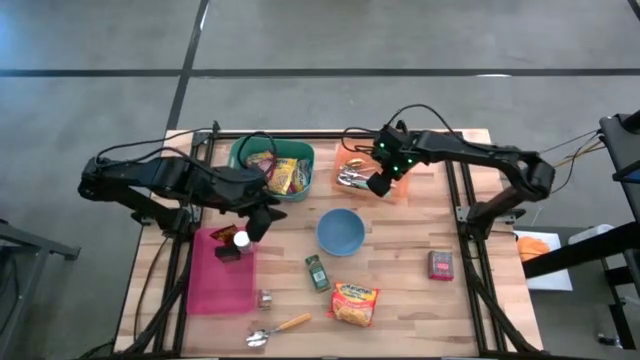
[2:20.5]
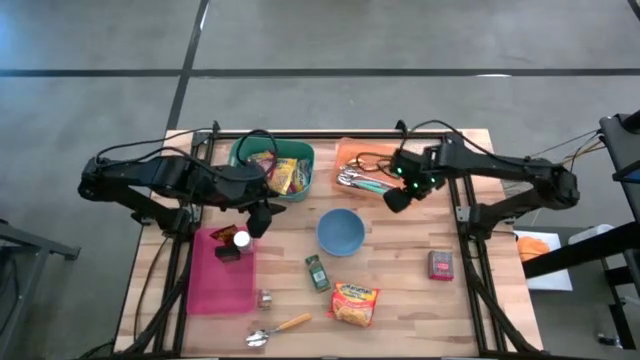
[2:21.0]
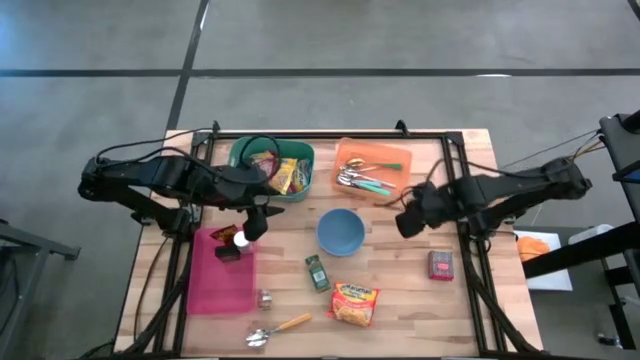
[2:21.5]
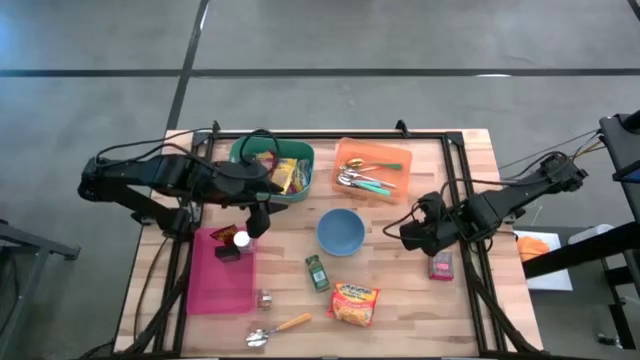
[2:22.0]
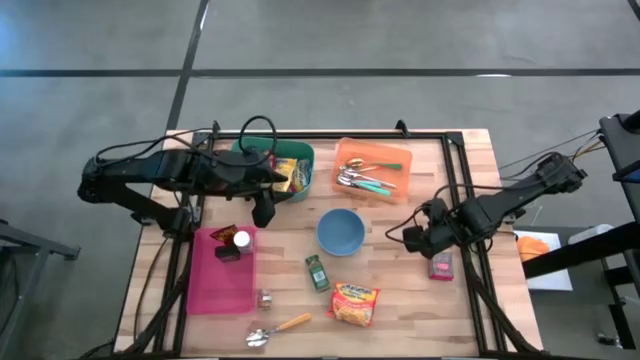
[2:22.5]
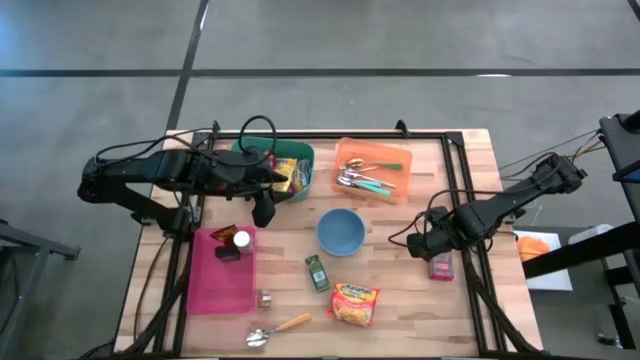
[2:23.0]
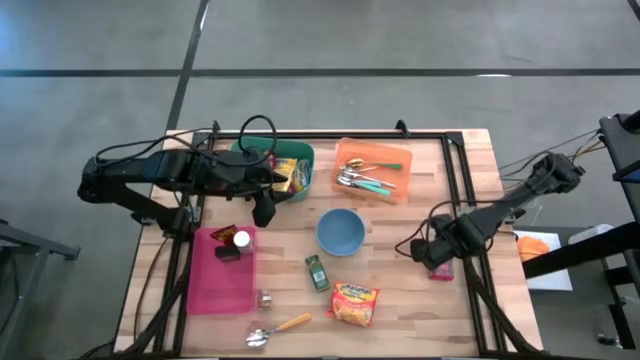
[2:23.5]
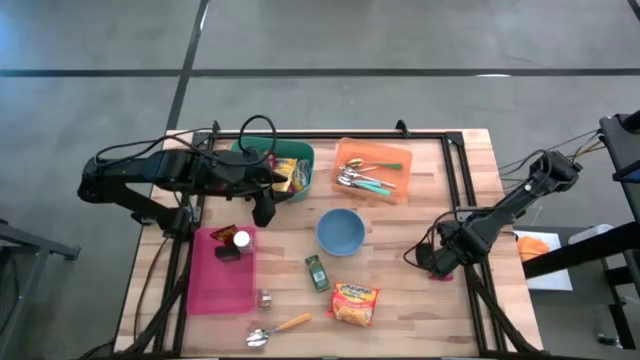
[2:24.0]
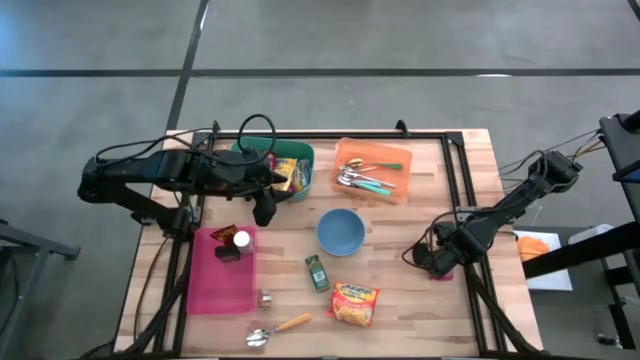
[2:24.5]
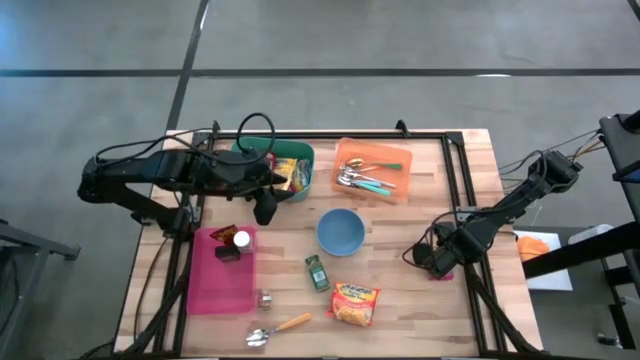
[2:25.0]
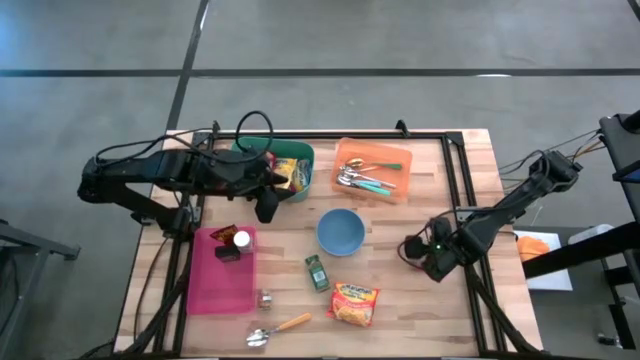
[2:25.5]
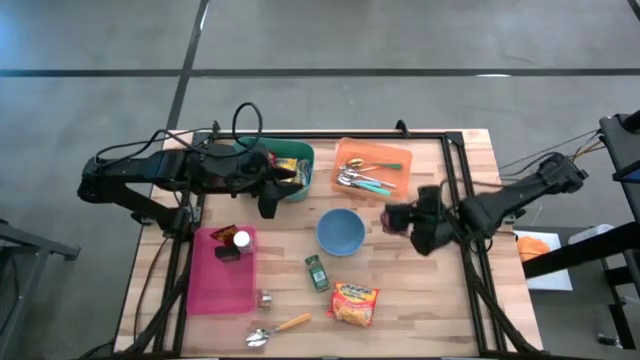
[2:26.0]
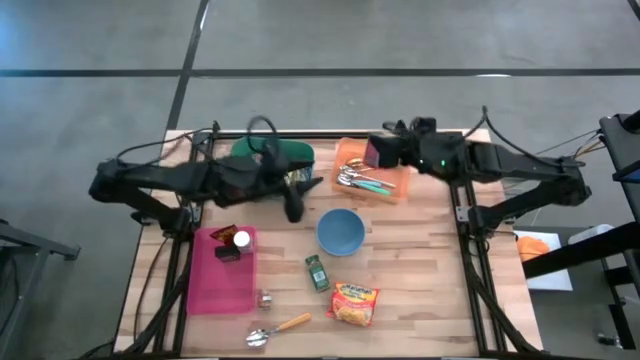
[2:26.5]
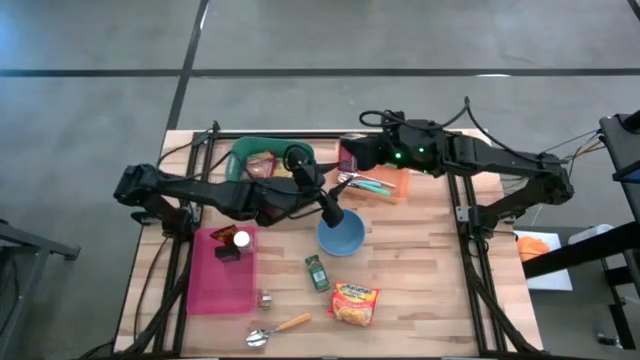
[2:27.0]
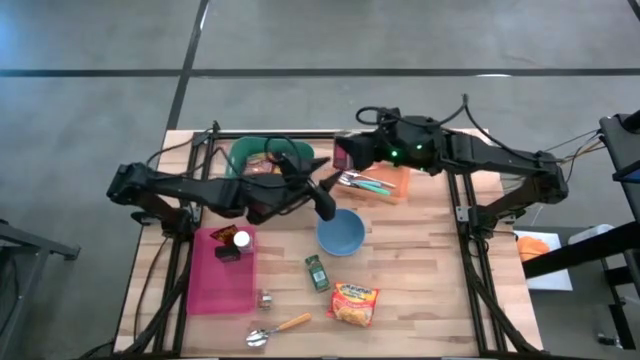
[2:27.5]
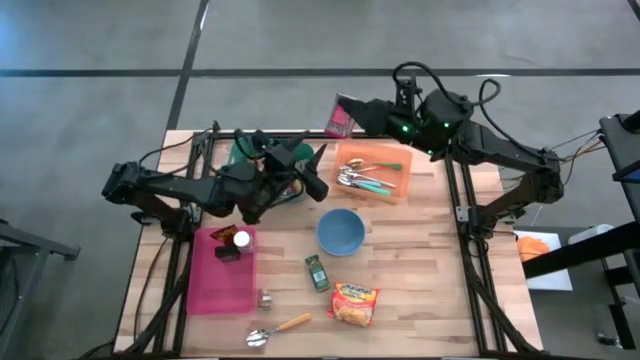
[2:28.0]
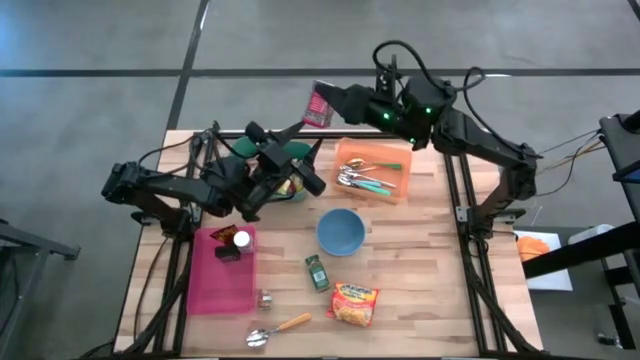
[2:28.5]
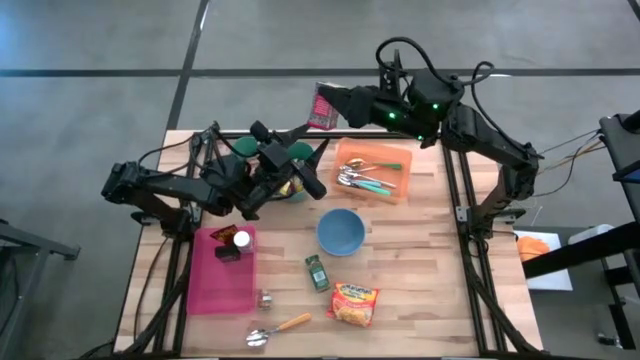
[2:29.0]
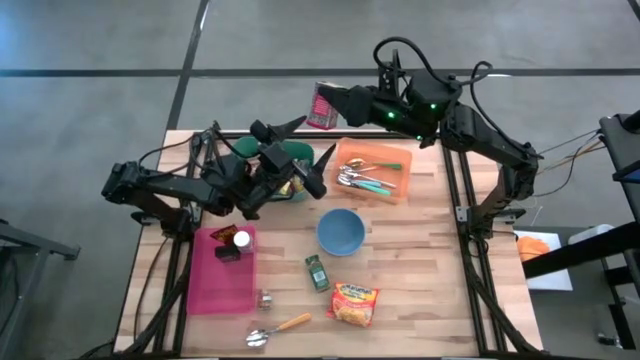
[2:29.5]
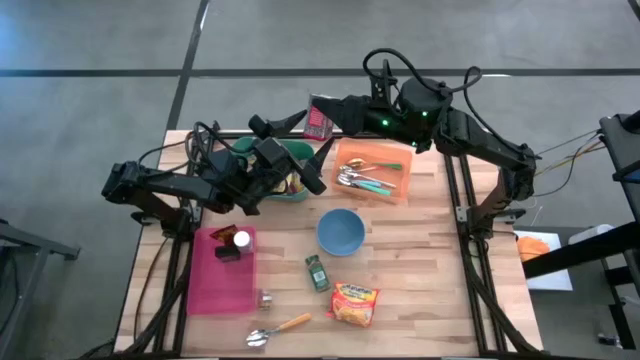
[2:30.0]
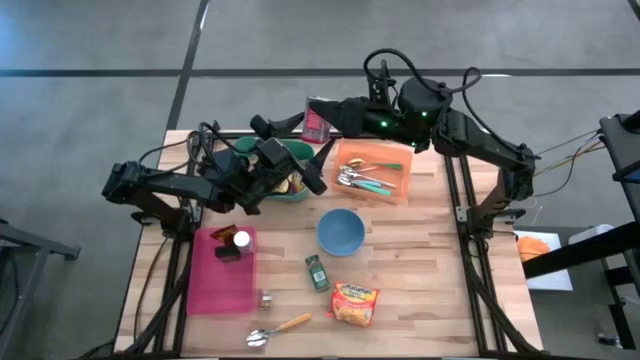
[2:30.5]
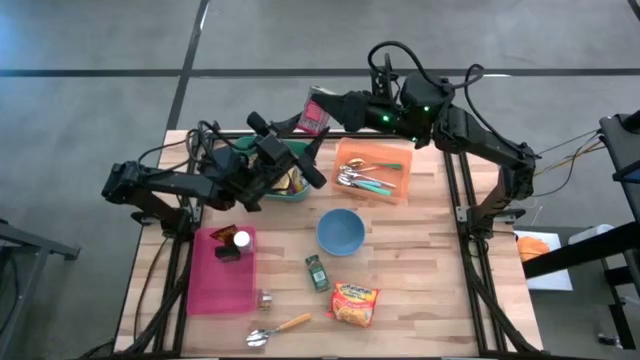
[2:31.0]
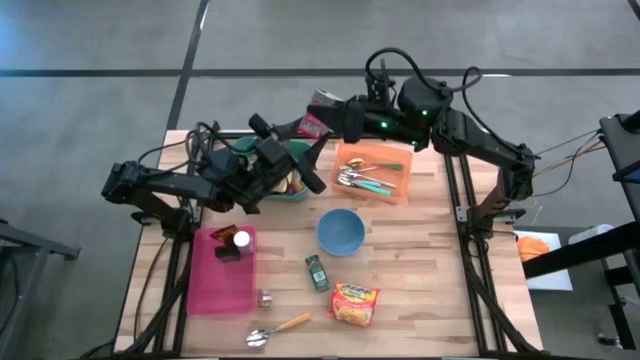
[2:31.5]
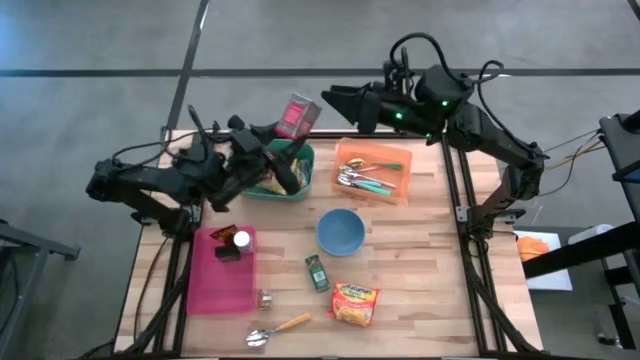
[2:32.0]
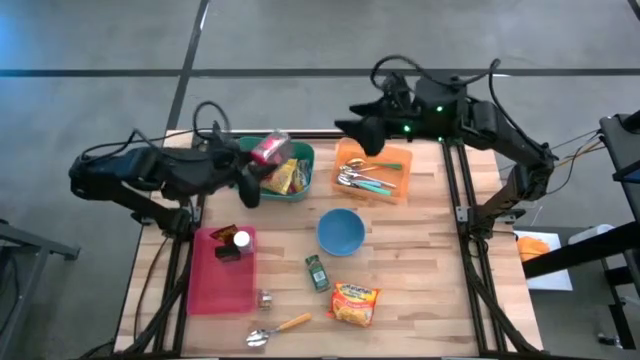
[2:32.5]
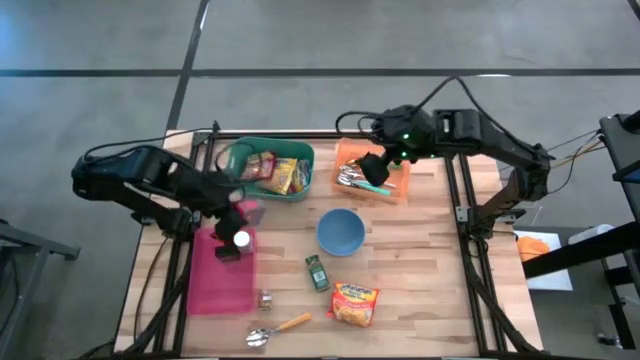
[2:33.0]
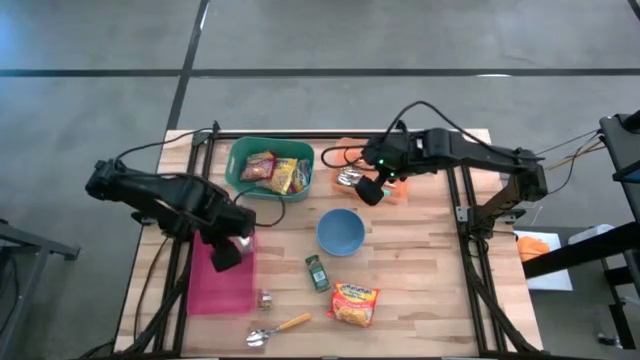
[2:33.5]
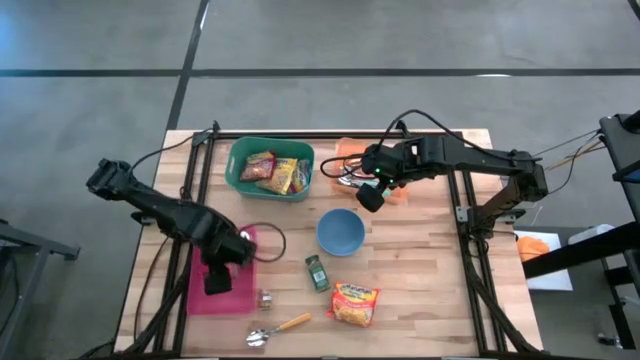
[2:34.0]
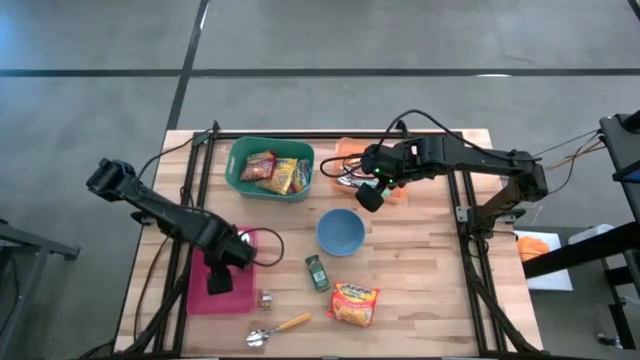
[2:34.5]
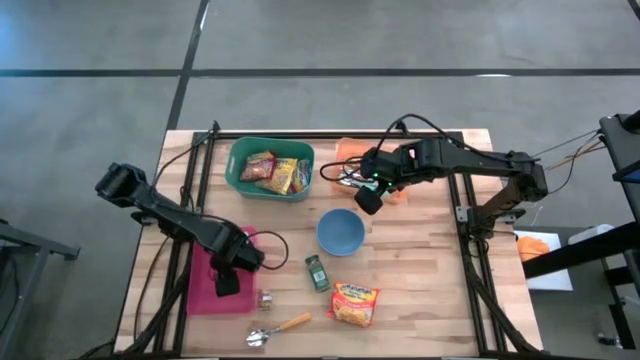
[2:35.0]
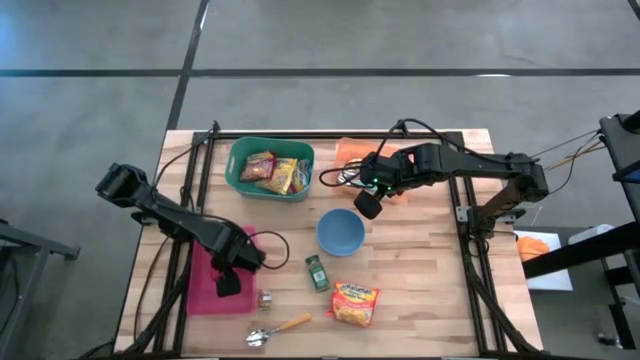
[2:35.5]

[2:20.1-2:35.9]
Put the red seasoning can into the pink bin

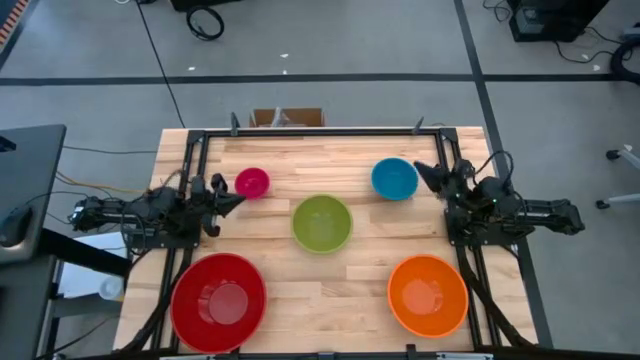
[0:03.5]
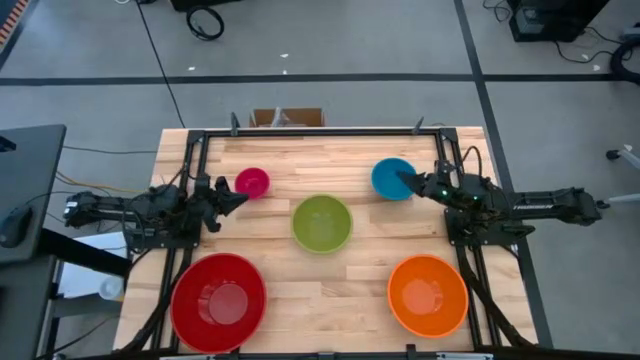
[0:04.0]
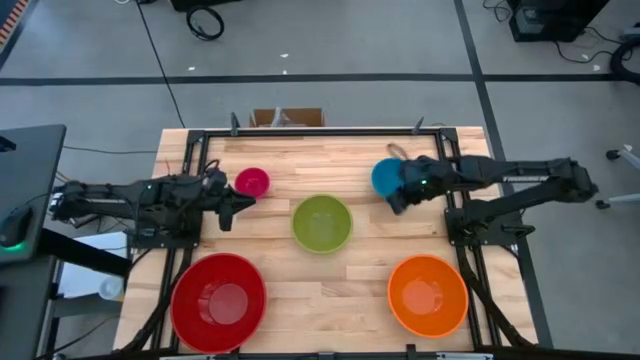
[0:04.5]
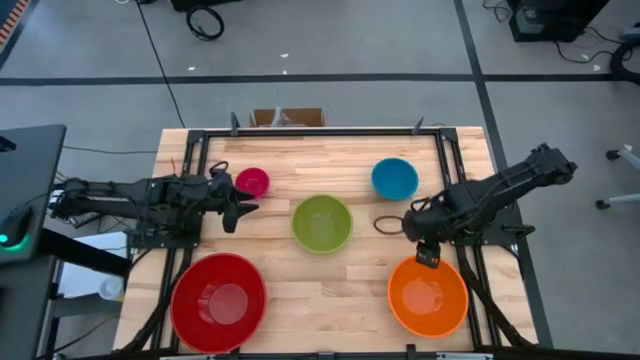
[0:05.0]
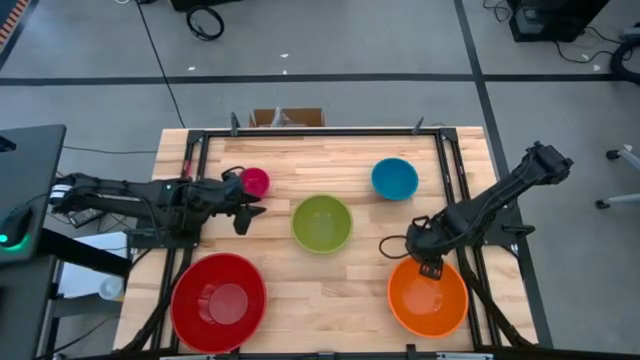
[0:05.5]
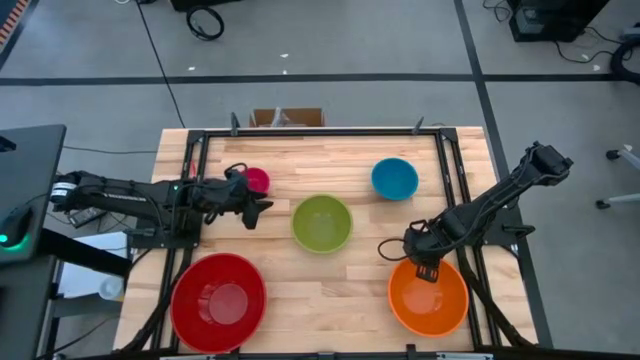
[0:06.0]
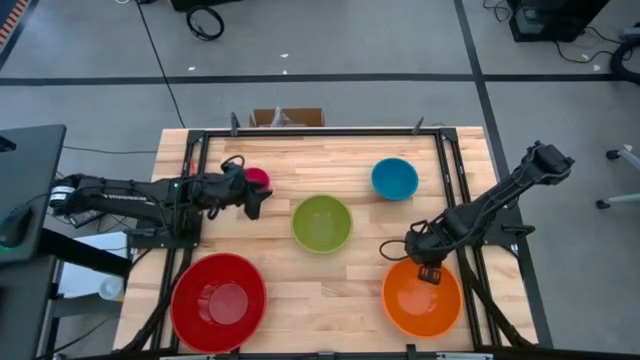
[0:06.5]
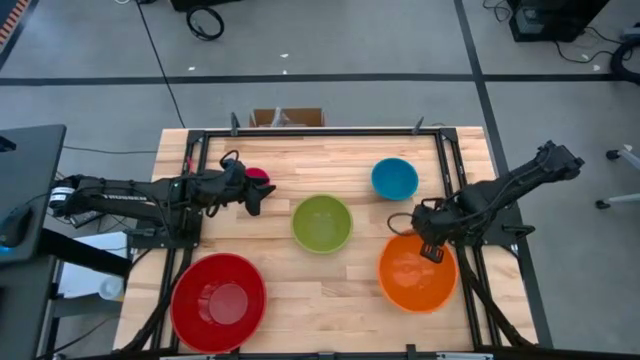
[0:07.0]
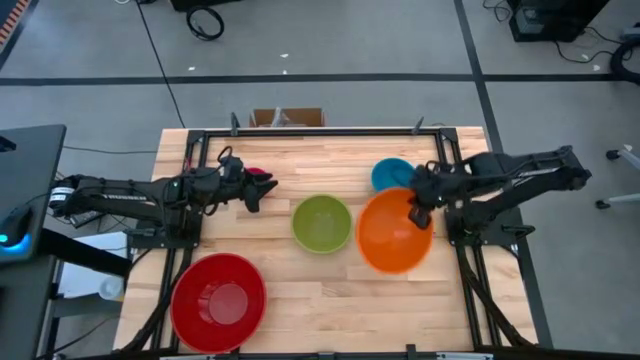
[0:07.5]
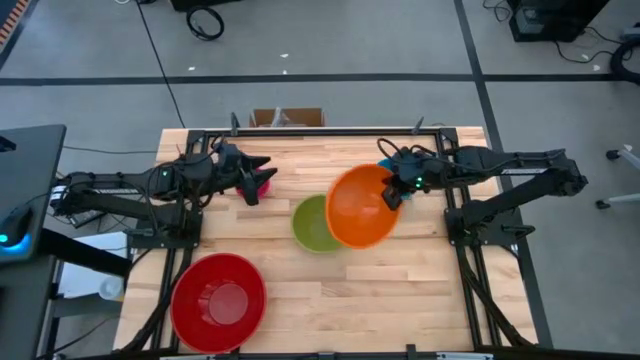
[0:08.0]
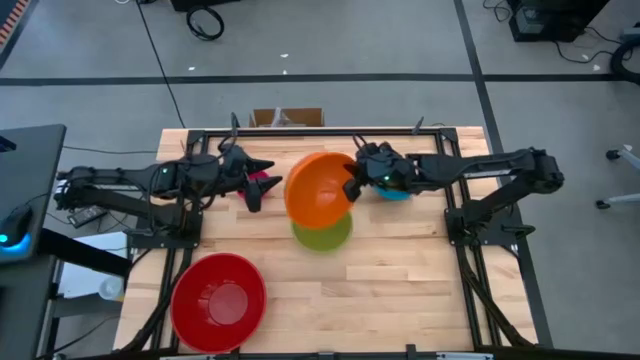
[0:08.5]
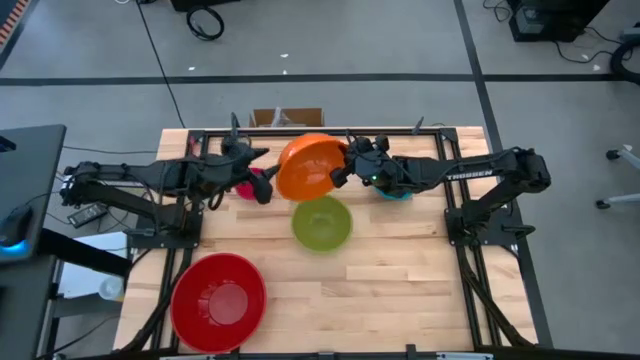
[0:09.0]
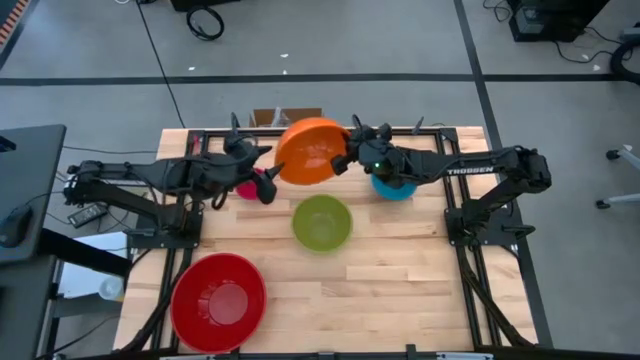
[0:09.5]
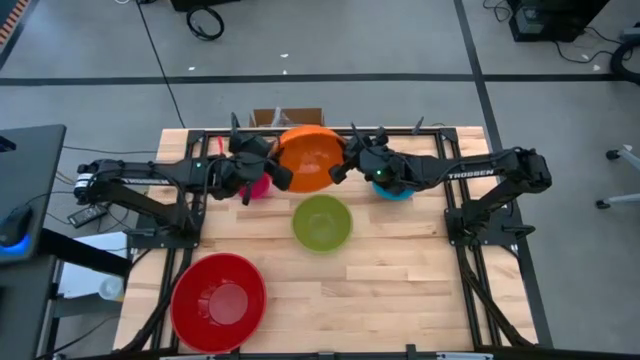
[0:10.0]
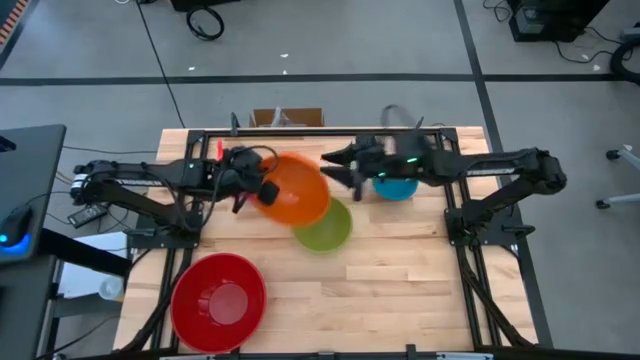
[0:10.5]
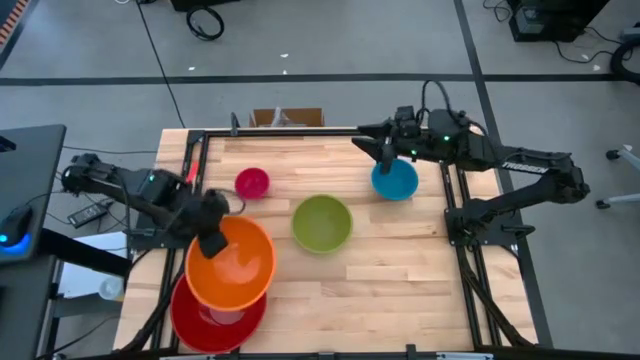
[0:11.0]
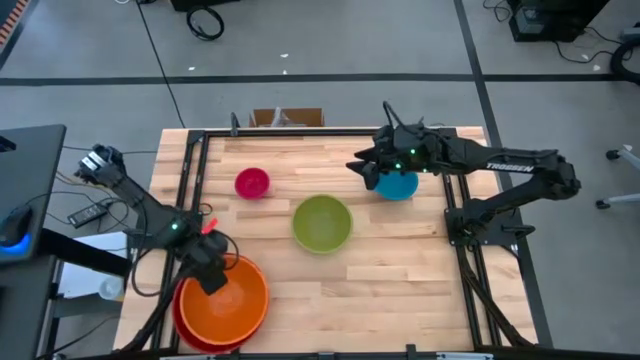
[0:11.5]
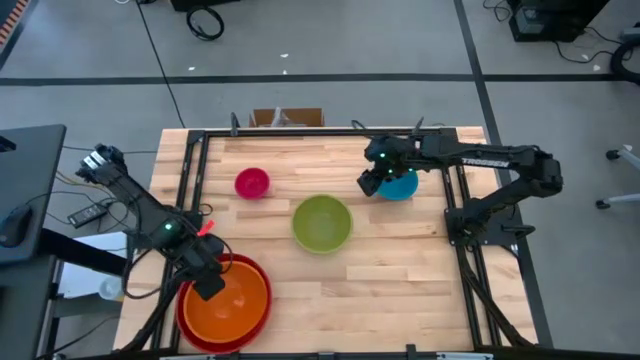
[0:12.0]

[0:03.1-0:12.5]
Stack the orange bowl on top of the big red bowl
